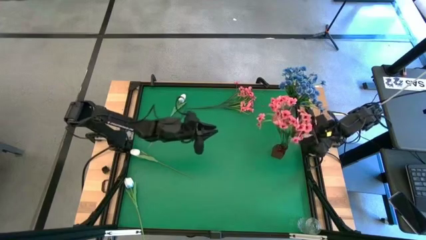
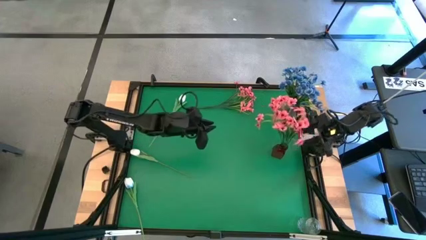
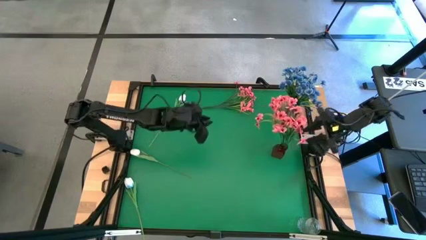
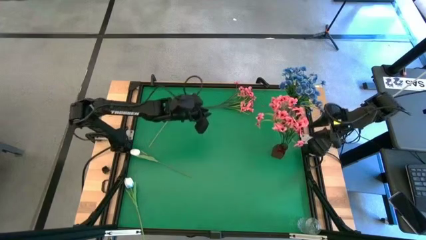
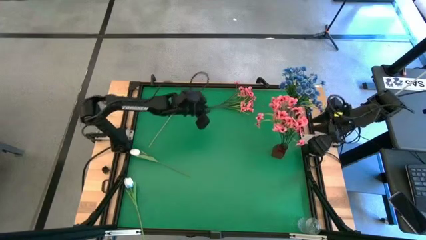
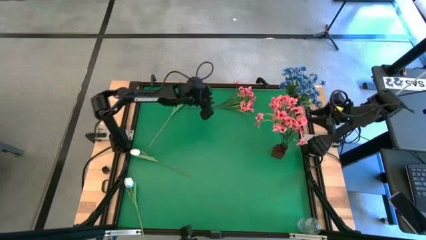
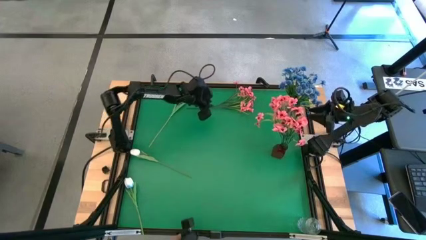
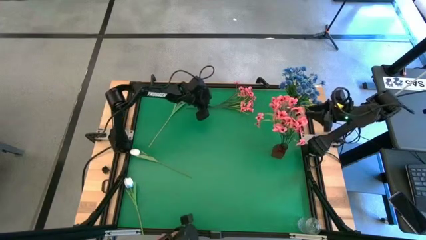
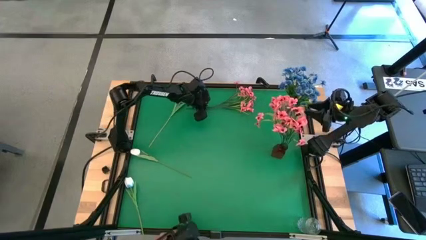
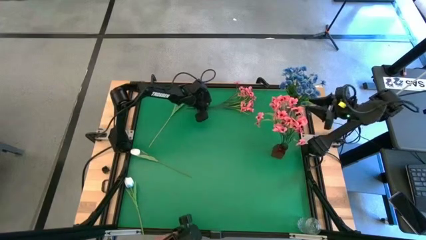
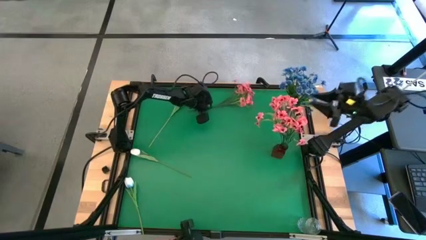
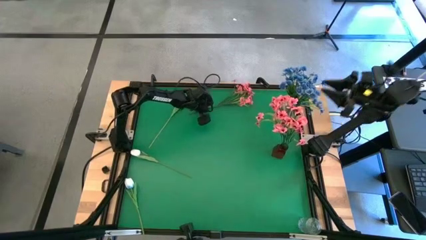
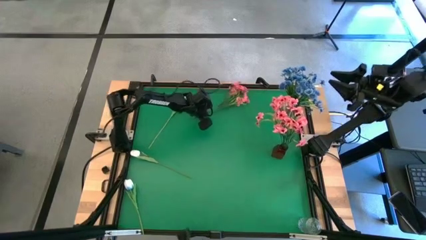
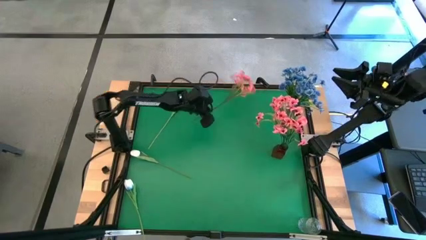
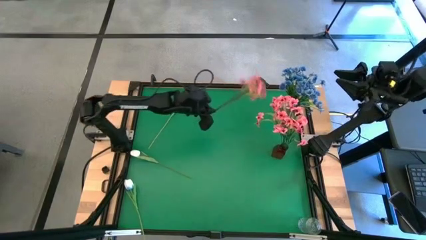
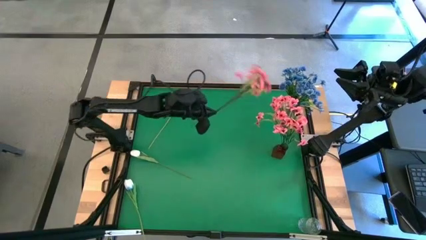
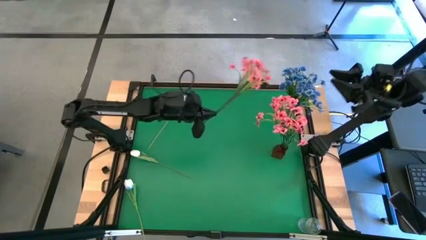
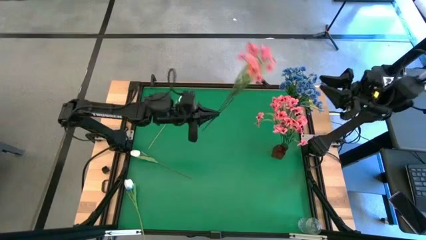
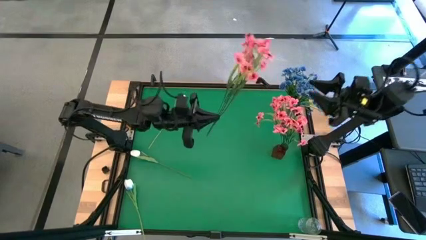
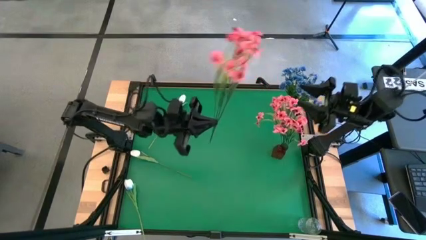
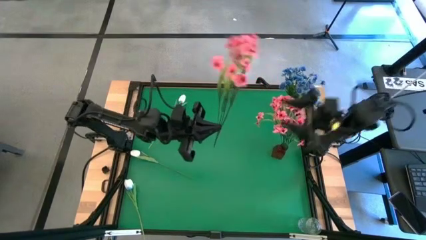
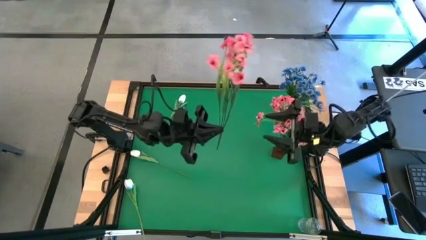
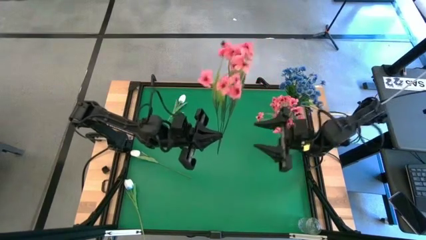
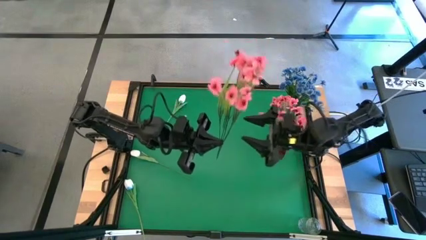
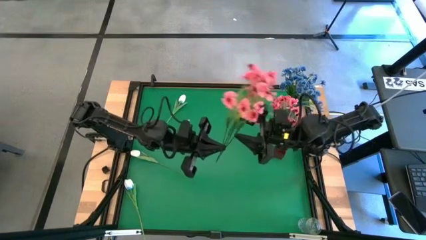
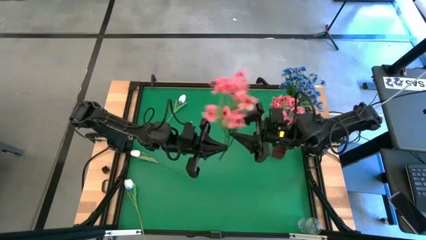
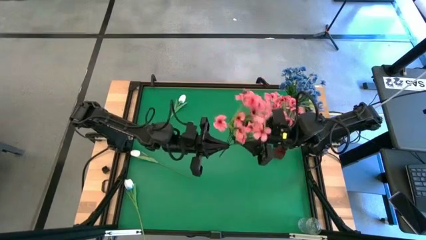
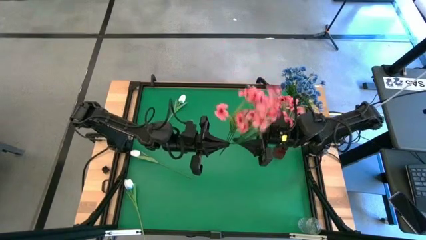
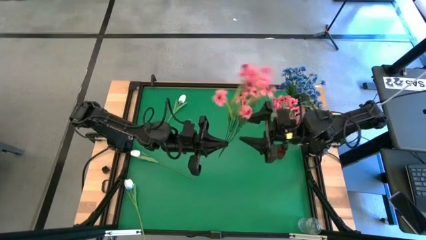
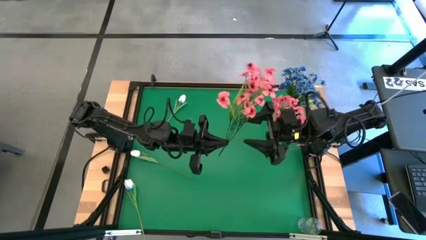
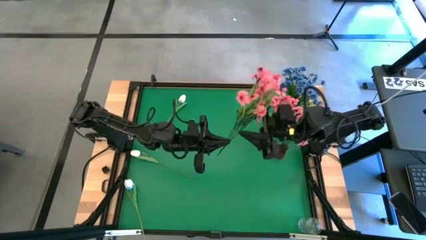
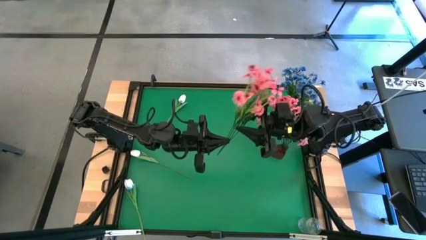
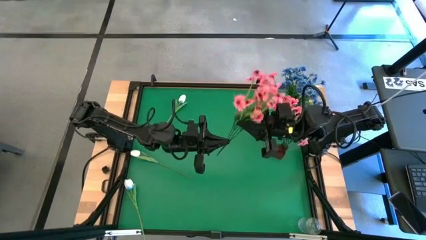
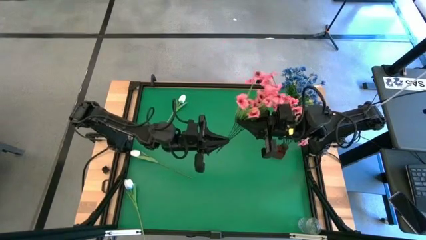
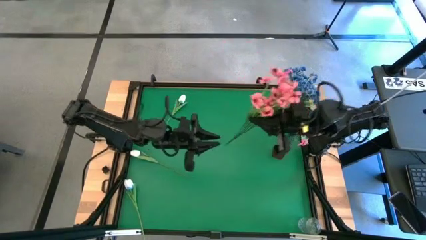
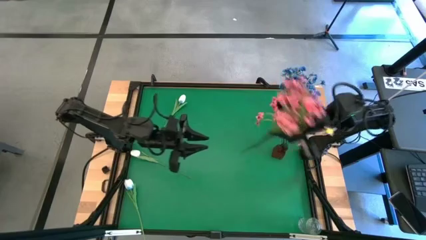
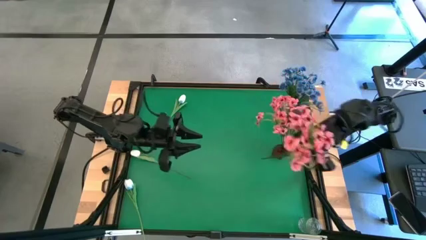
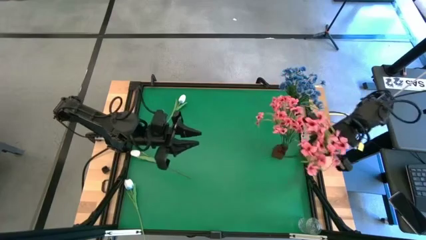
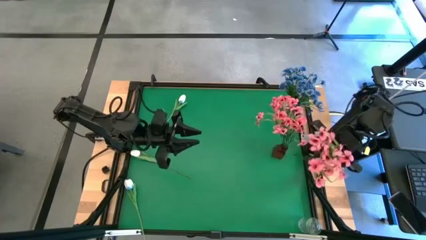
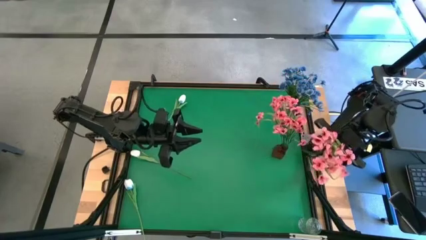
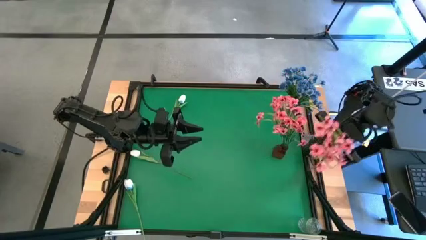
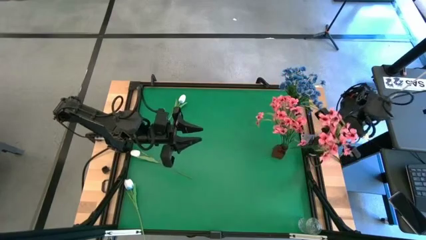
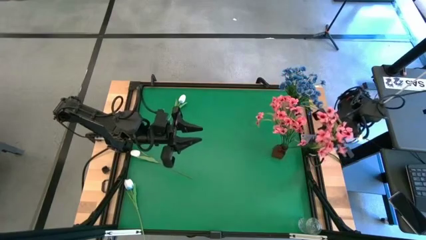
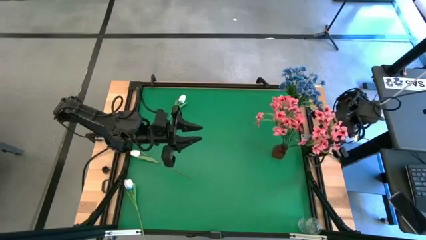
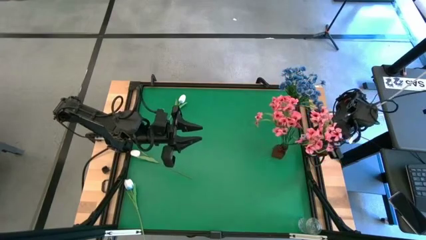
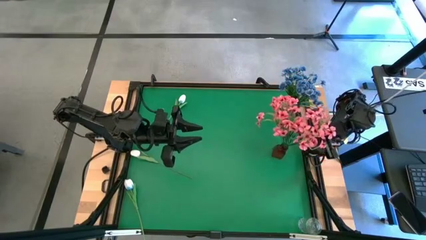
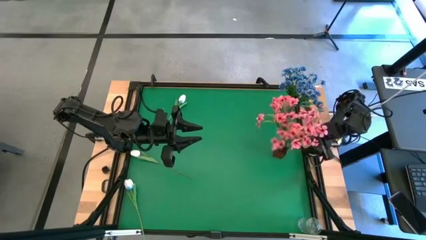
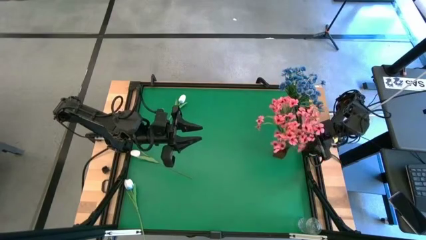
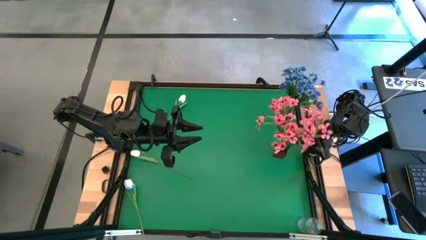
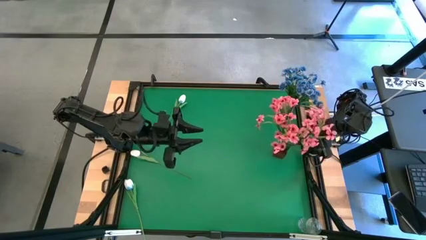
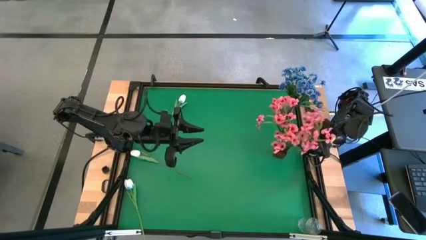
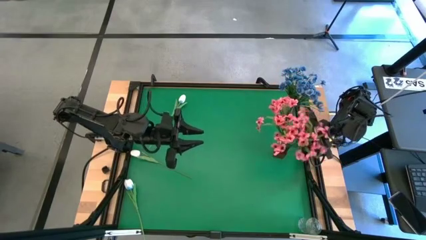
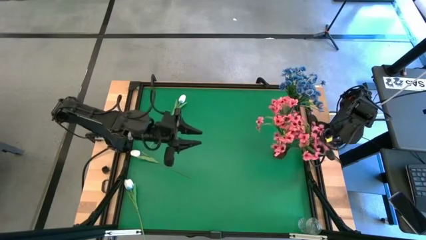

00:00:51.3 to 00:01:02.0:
Task: Sort flowers into vase by color
Put the pink flowers into the red vase
